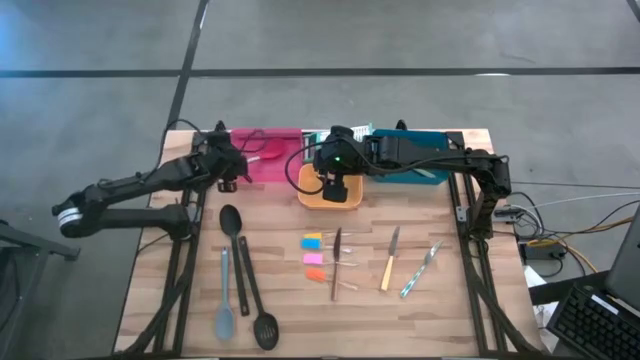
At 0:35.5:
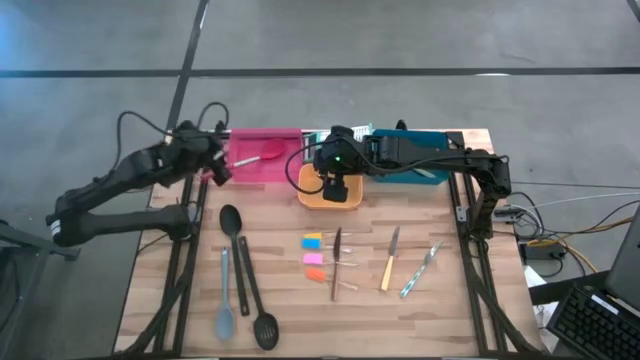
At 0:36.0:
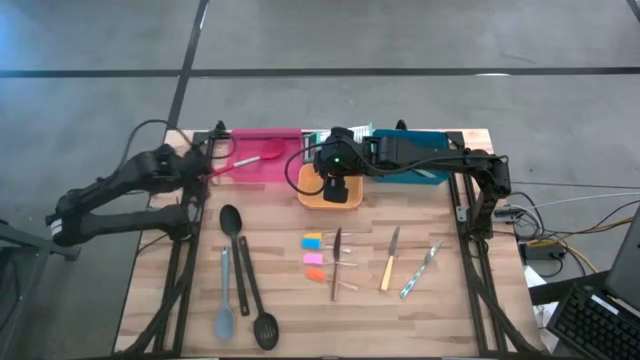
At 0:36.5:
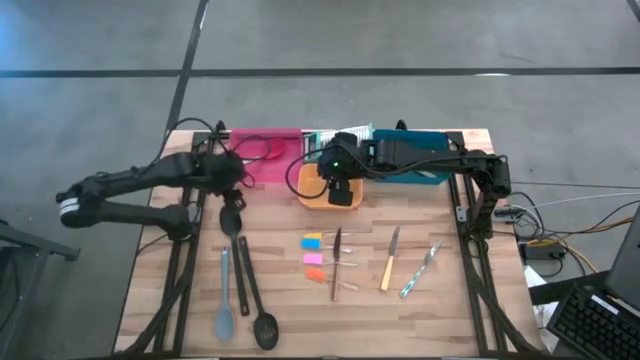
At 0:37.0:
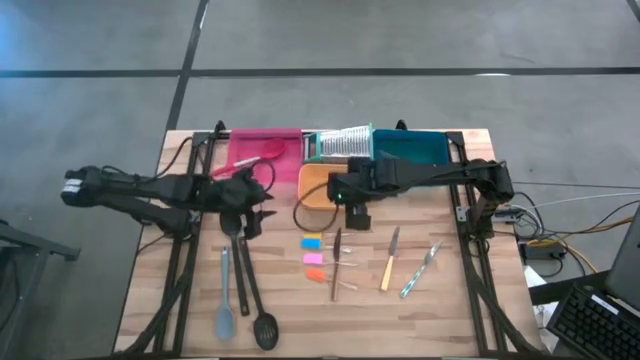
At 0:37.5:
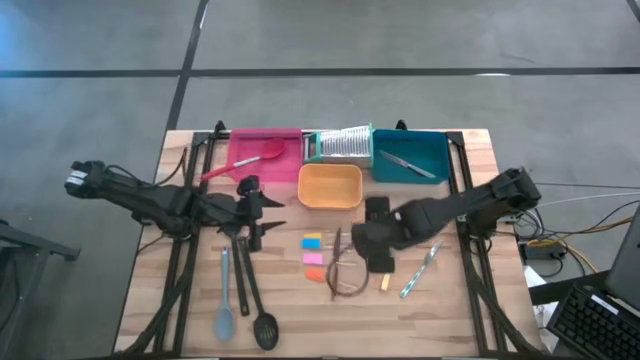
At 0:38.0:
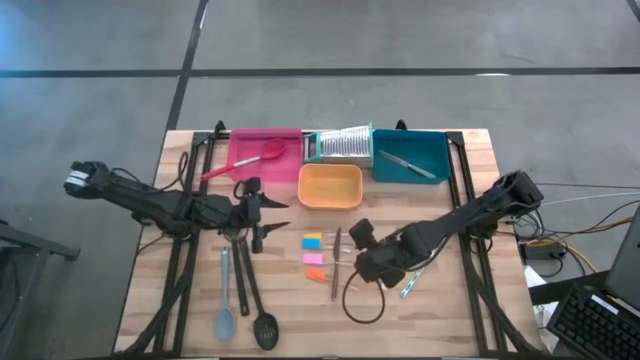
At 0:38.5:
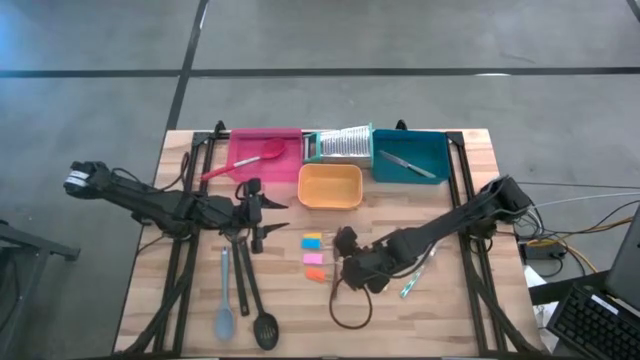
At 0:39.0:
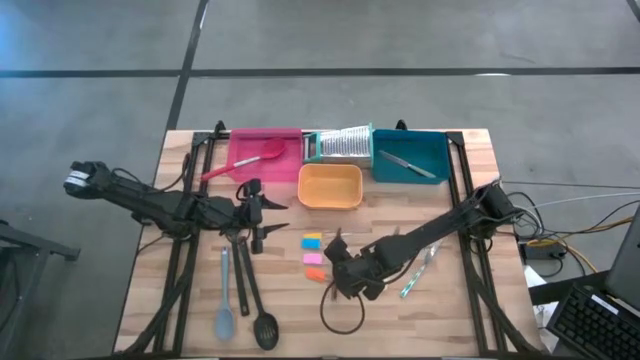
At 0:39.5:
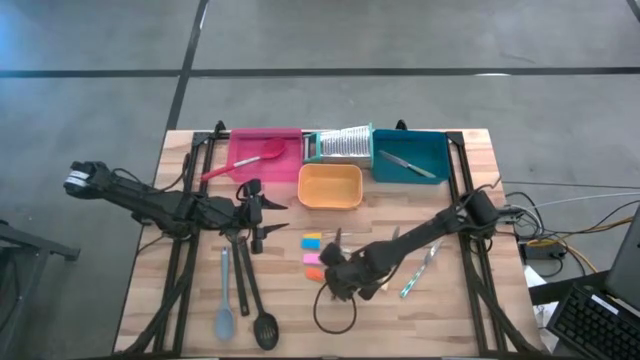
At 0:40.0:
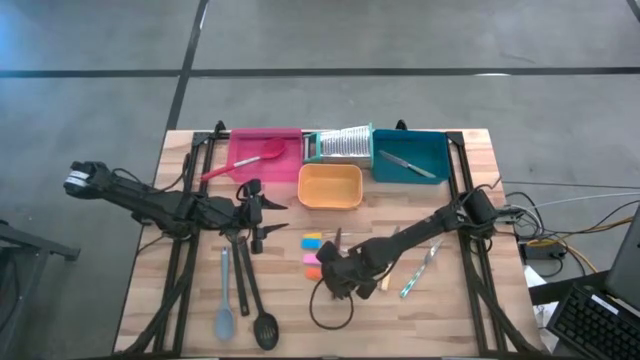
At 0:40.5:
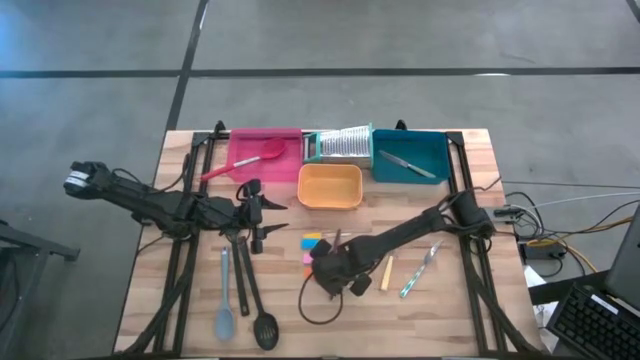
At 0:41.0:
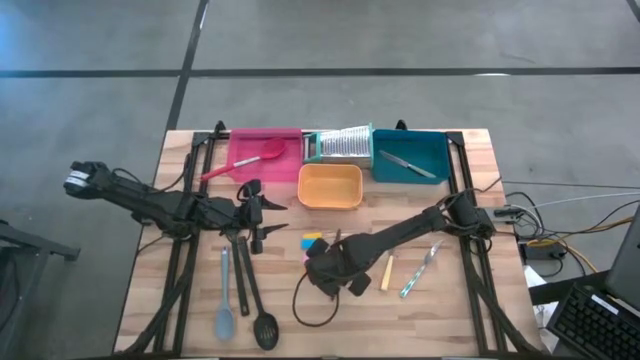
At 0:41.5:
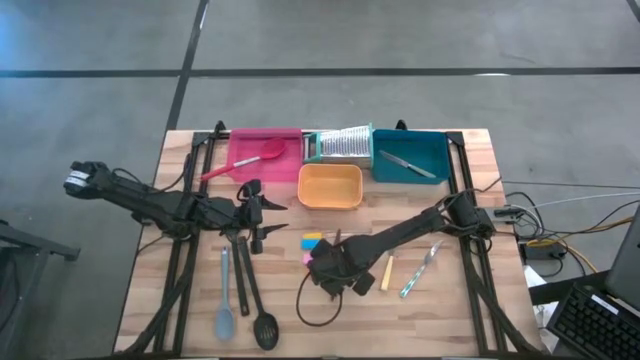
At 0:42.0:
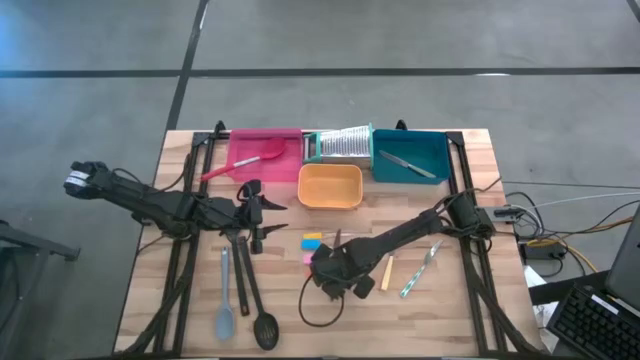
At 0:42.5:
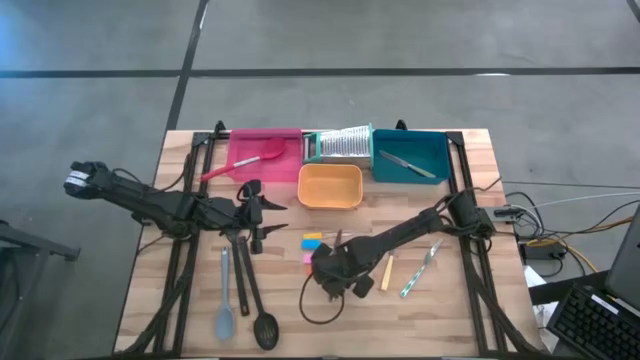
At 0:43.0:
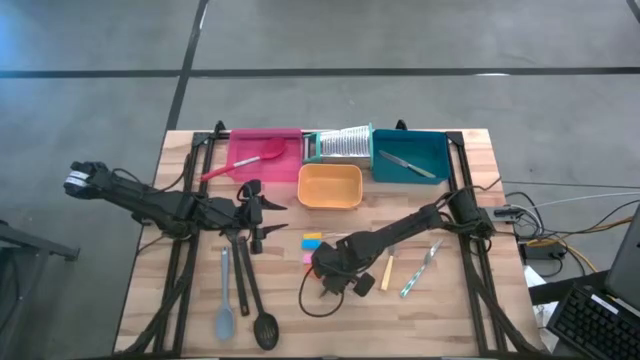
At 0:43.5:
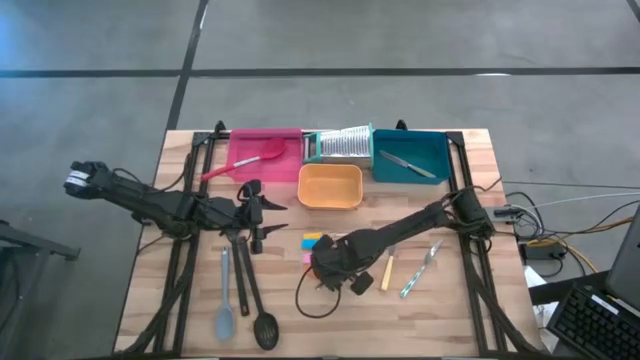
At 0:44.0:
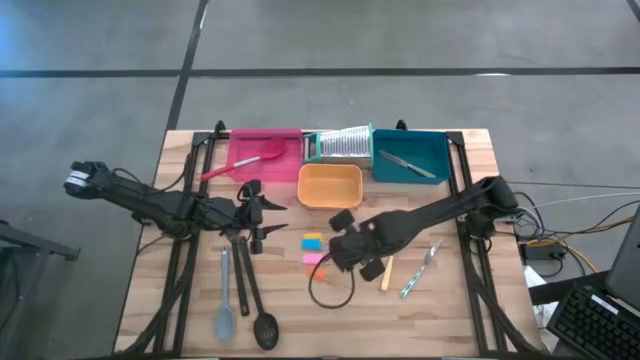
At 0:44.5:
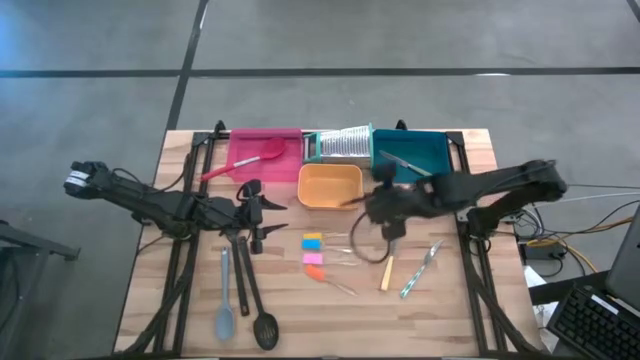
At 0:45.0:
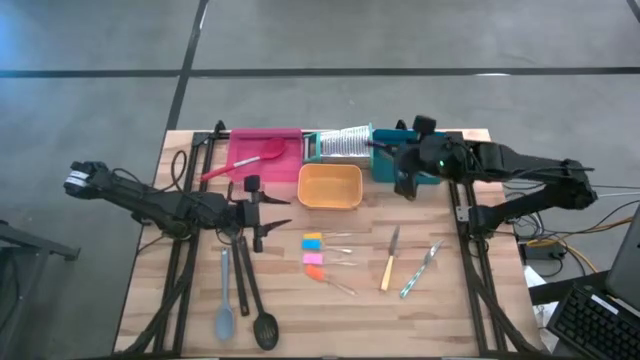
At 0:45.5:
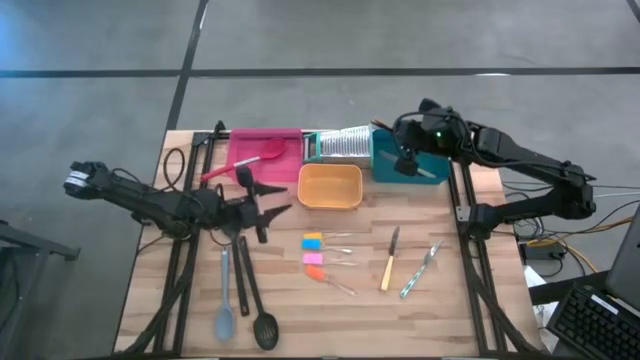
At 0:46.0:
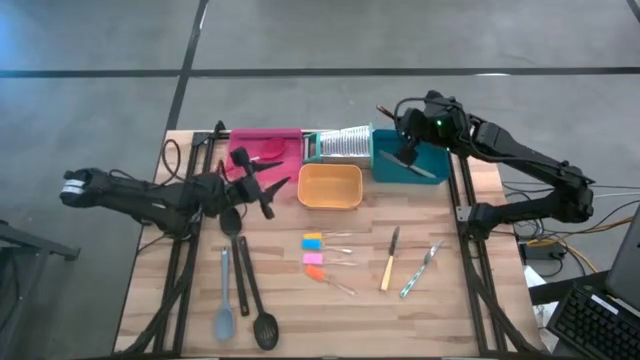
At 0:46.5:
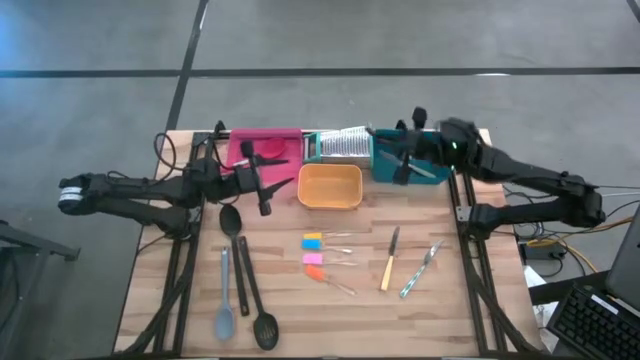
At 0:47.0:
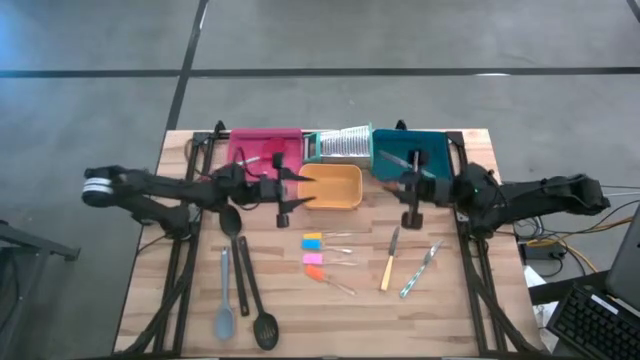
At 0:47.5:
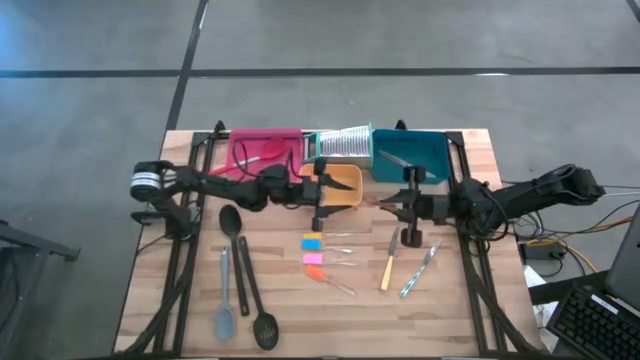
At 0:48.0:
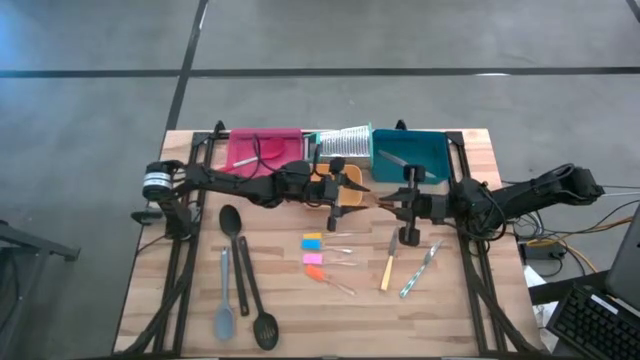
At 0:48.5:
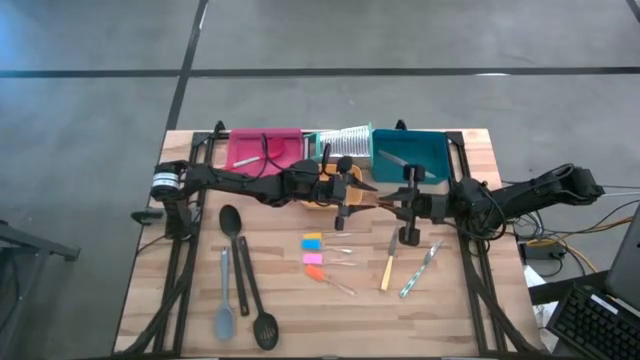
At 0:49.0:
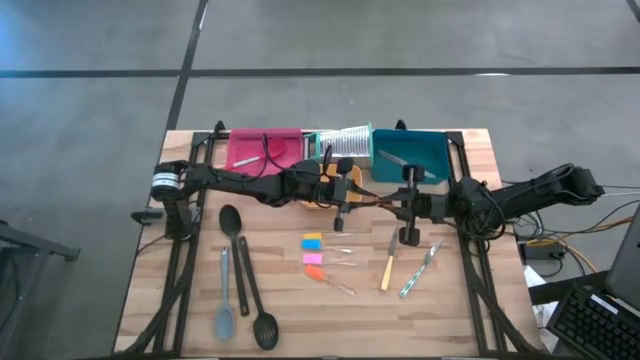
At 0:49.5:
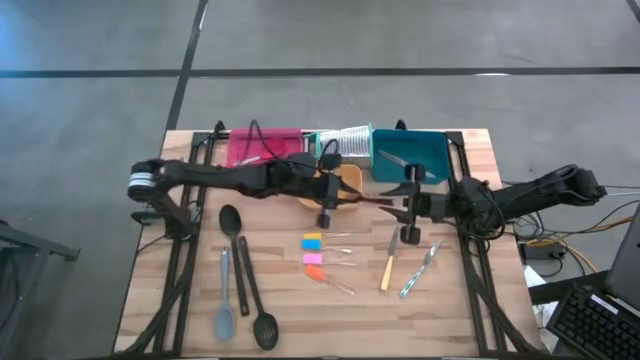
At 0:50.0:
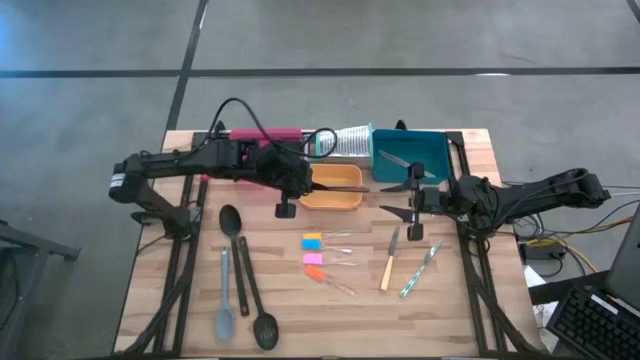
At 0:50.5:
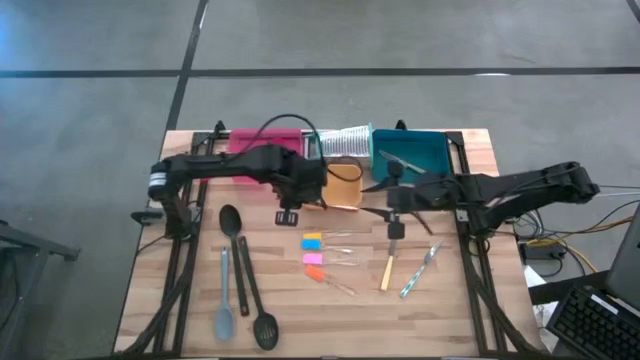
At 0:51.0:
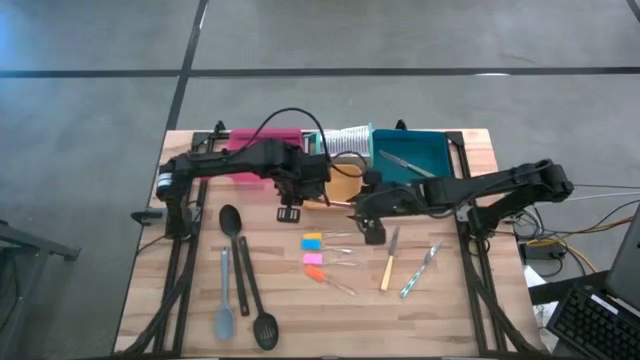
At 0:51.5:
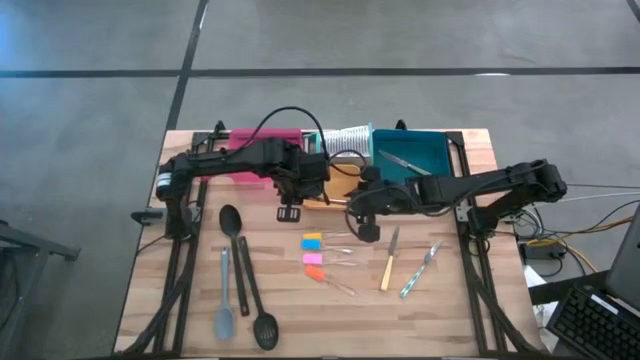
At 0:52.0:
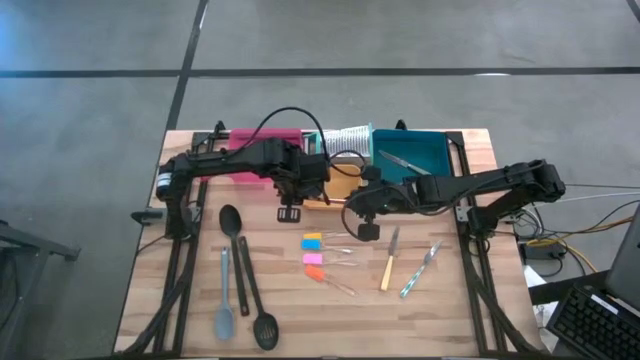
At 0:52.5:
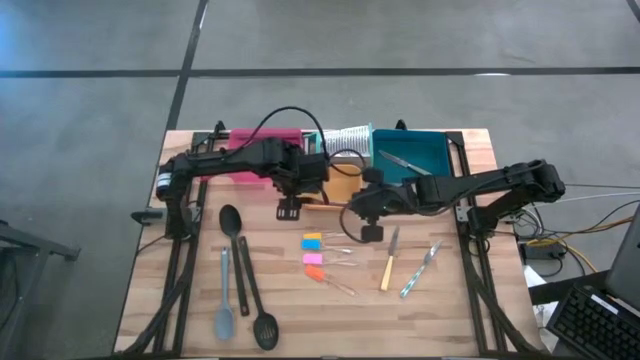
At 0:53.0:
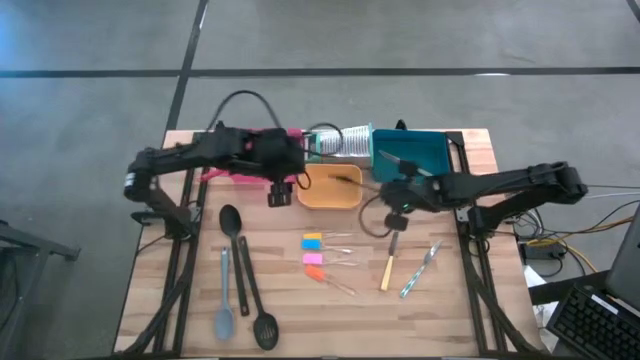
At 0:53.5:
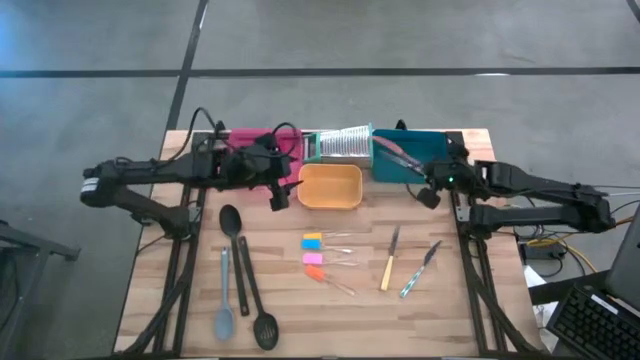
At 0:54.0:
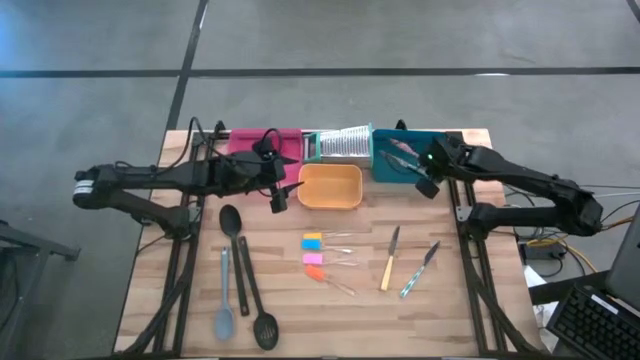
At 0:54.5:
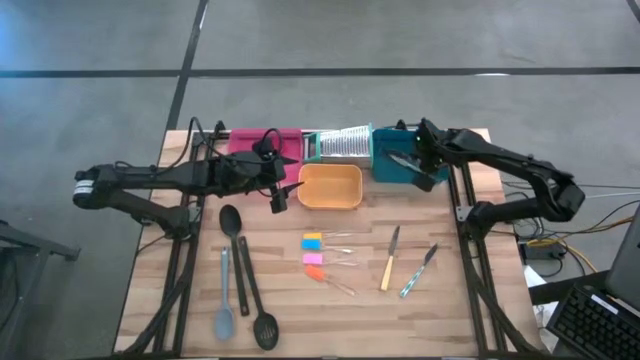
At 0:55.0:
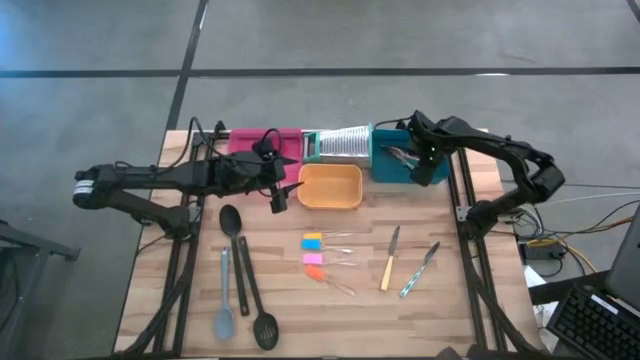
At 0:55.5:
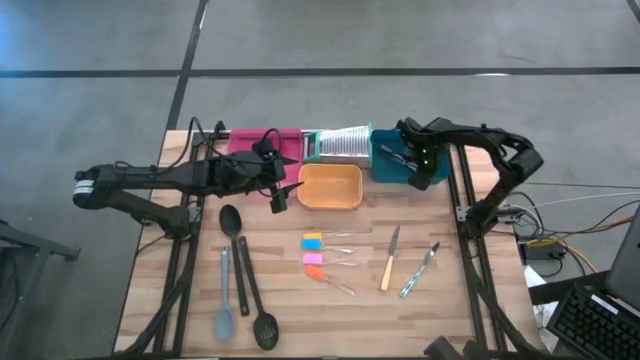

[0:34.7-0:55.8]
Task: Pick & Place Kitchen Items
Put the gold knife into the blue bin
